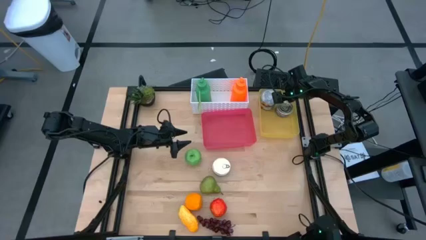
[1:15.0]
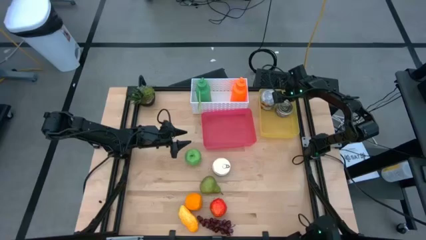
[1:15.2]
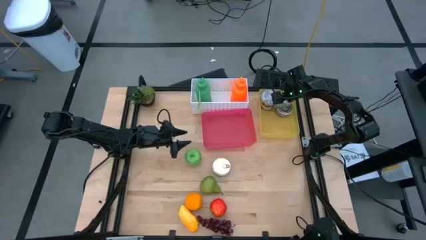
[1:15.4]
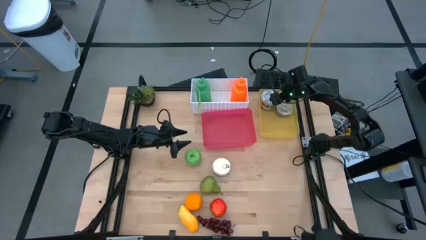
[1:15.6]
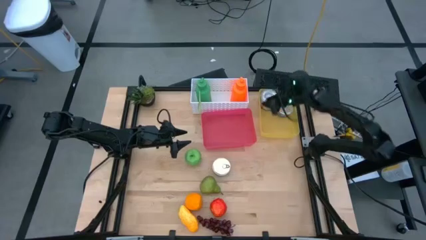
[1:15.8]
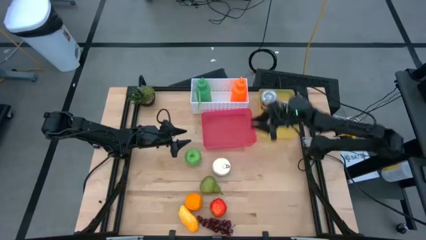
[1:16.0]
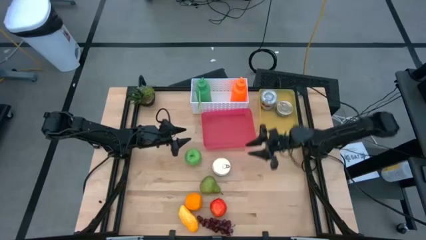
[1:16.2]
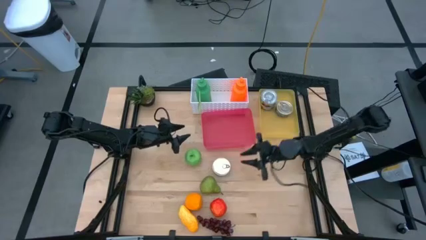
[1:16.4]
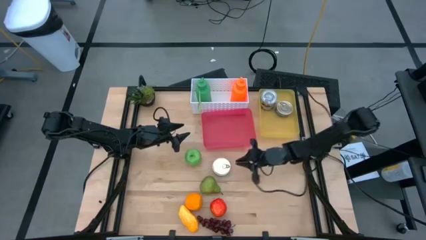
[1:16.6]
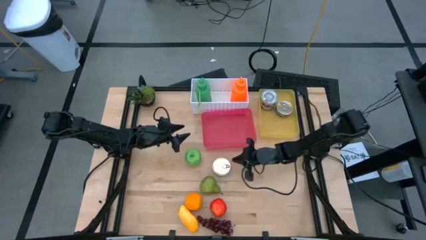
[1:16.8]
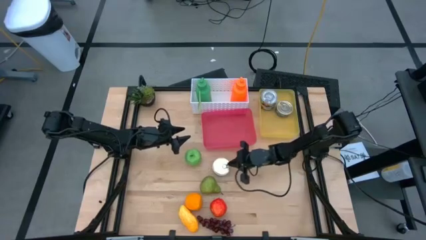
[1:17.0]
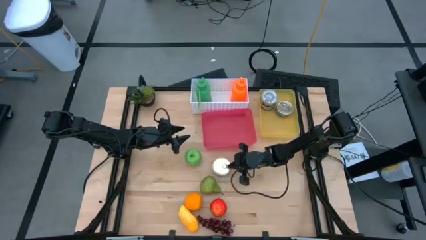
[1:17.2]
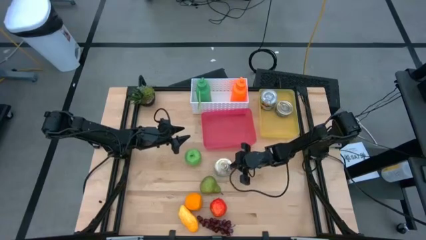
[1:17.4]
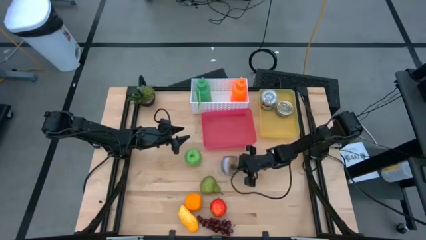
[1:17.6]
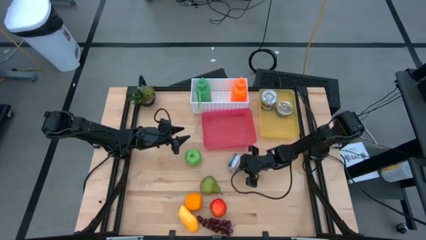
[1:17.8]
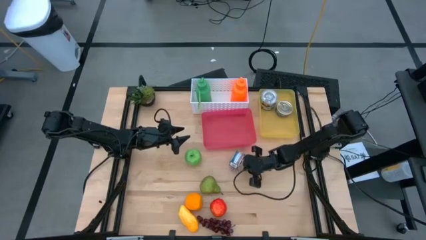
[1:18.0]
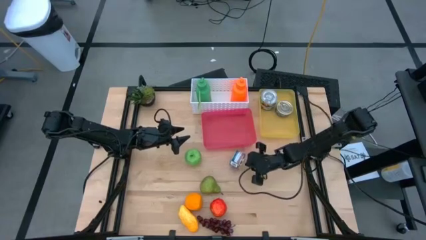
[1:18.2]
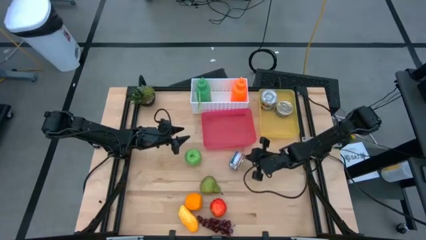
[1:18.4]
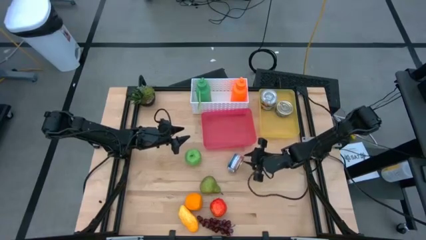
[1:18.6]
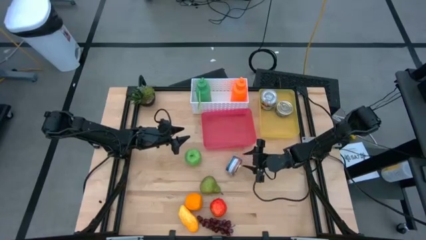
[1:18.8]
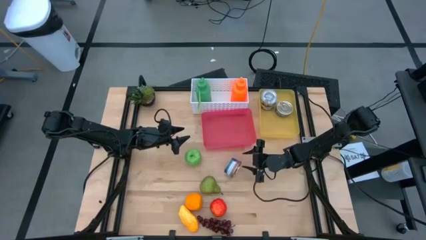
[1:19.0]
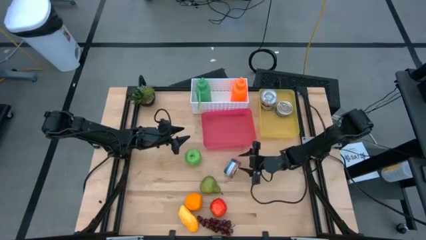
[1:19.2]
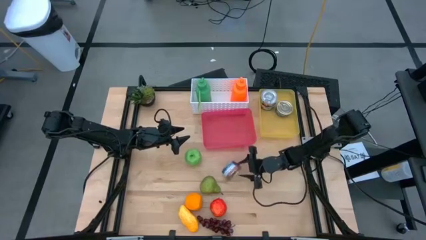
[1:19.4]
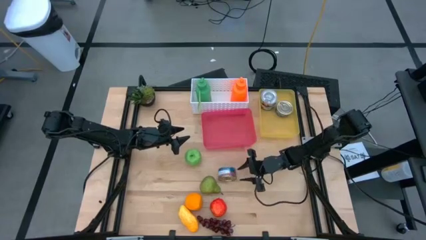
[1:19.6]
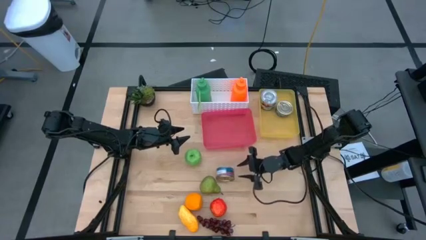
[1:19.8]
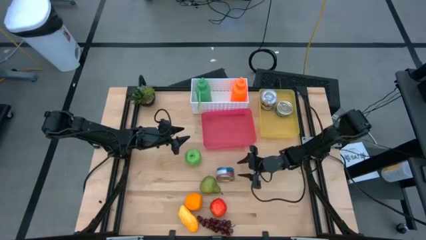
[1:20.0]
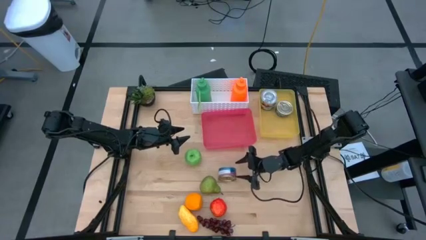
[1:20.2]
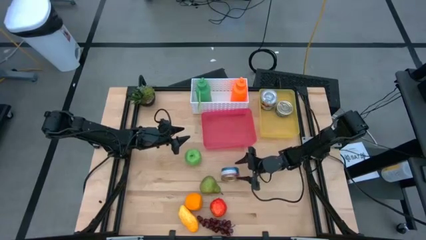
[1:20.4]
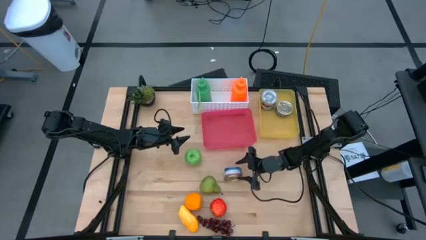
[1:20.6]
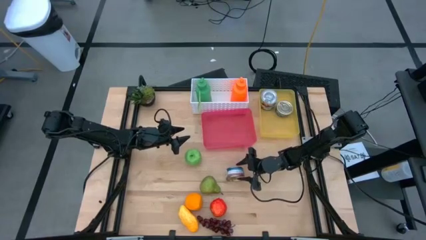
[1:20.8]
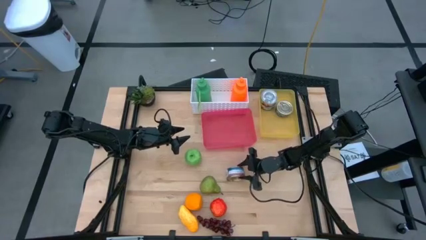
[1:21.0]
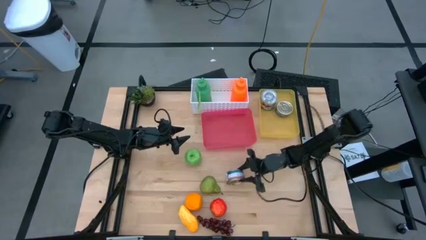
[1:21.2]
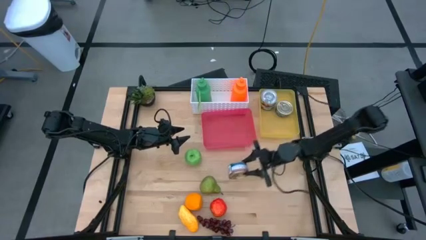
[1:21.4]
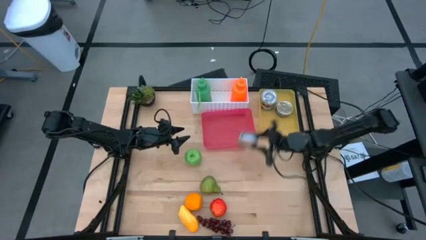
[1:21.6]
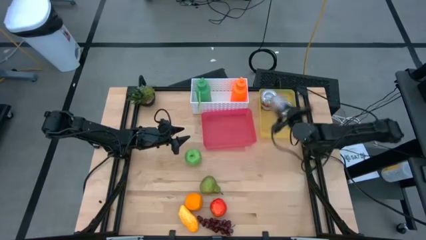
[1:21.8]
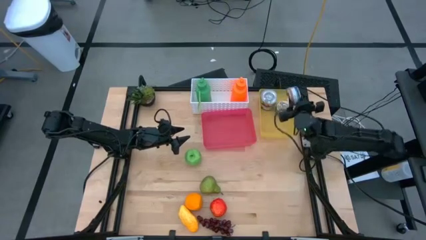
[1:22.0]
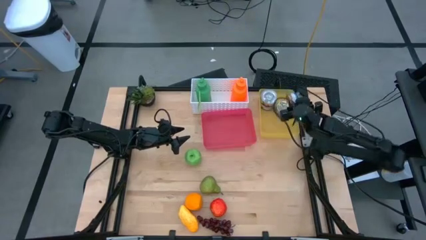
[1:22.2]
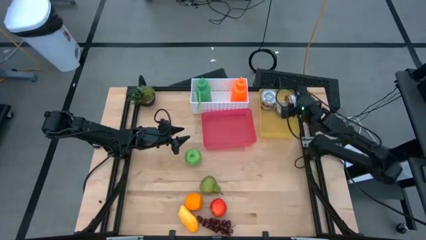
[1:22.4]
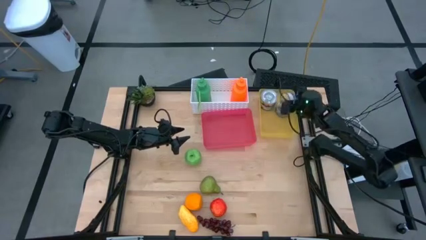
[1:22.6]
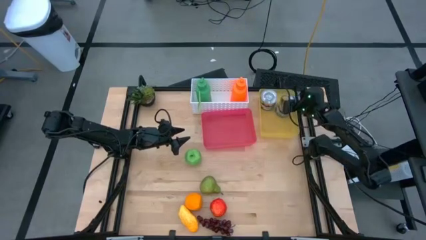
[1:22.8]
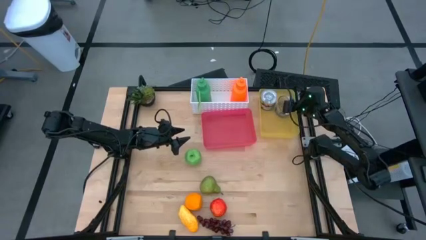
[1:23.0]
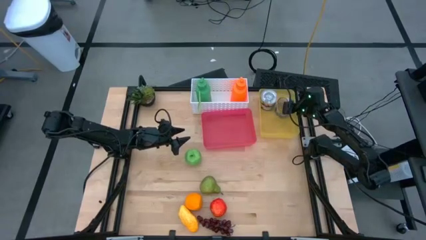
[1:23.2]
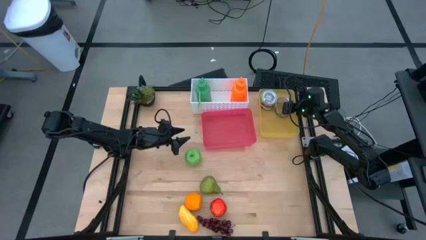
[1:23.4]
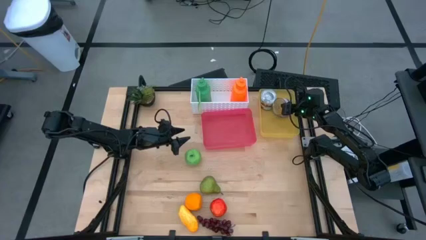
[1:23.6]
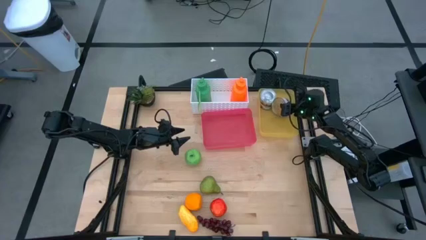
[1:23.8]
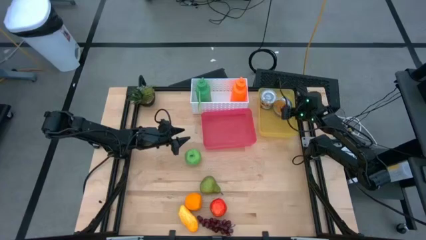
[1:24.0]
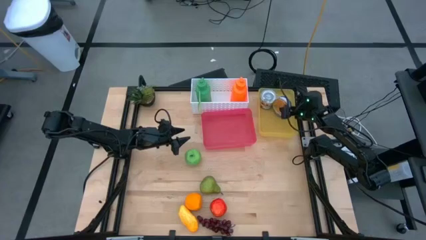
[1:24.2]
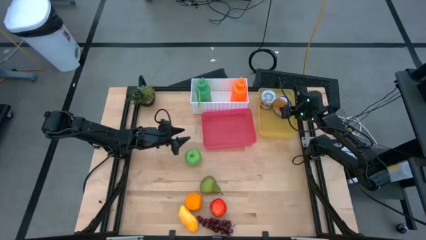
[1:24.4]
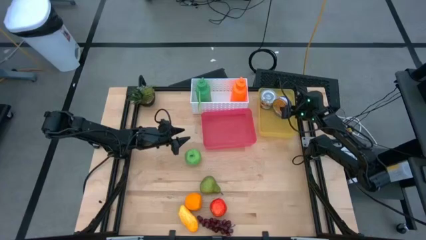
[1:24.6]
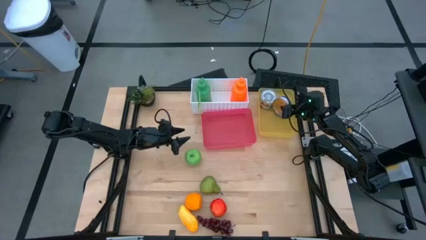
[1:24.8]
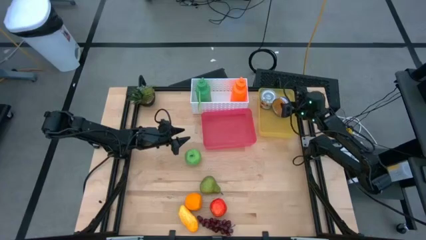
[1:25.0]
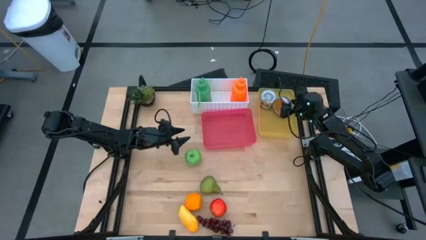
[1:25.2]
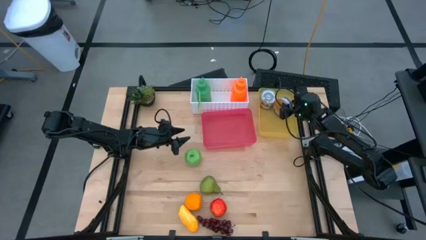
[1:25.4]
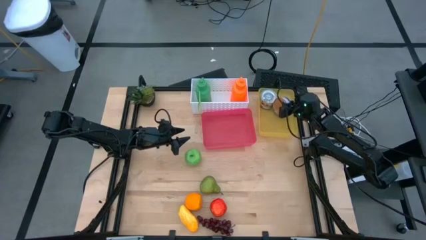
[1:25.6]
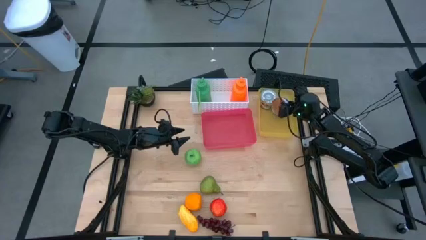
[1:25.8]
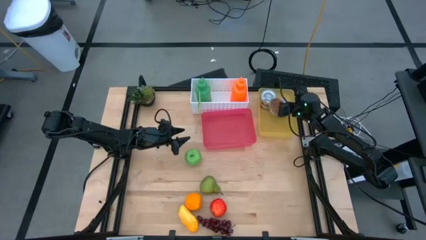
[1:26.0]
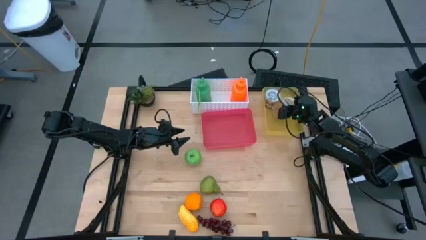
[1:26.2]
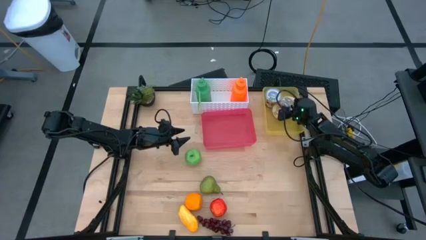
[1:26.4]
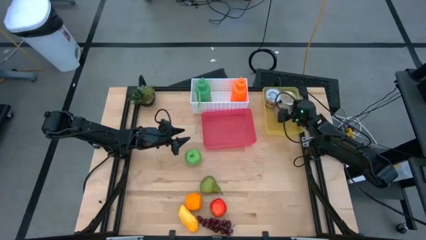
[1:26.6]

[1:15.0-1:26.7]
Task: Pick & Place Food Item
Put the blue and pink tuna can into the yellow bin
